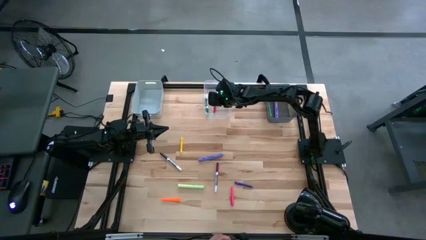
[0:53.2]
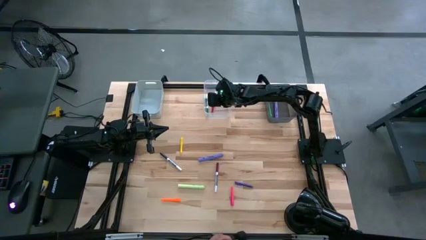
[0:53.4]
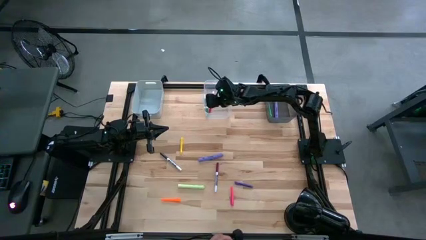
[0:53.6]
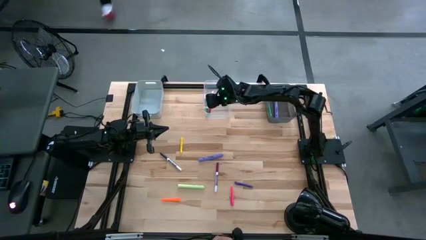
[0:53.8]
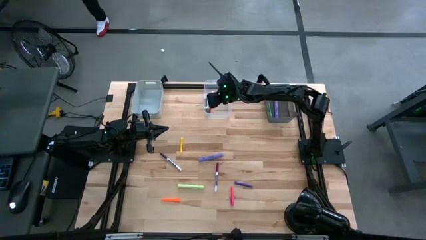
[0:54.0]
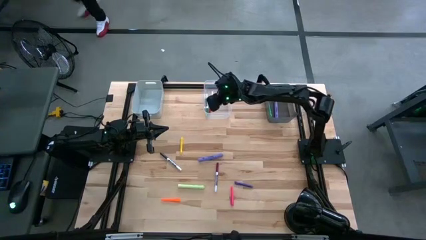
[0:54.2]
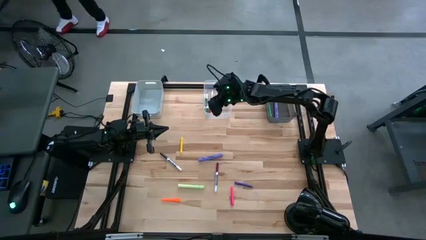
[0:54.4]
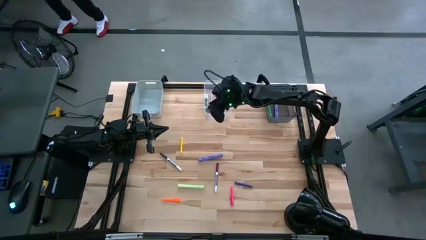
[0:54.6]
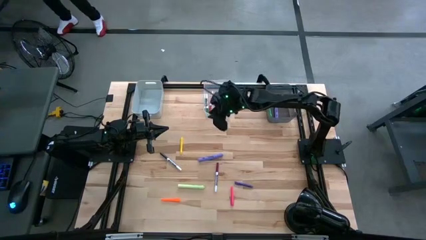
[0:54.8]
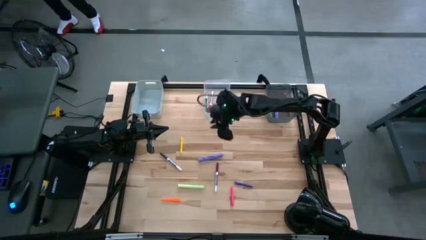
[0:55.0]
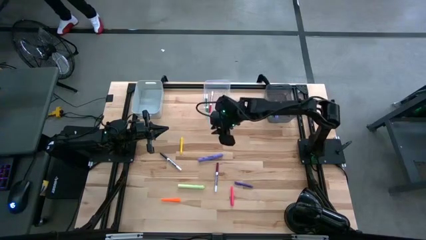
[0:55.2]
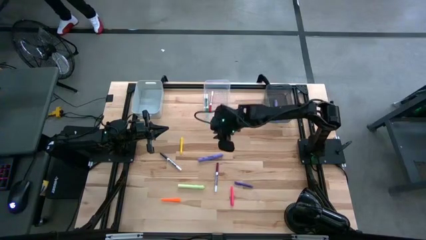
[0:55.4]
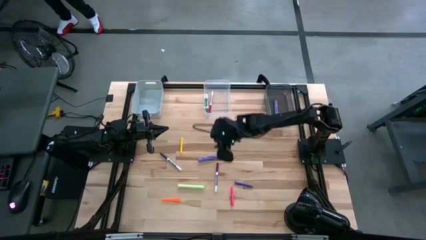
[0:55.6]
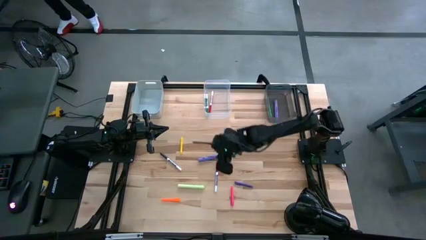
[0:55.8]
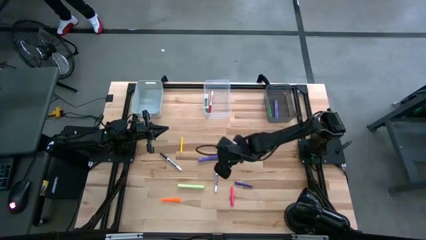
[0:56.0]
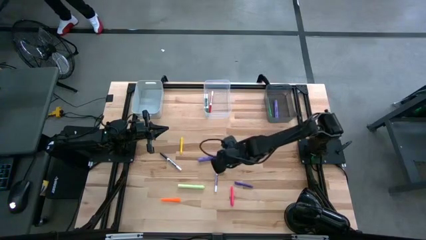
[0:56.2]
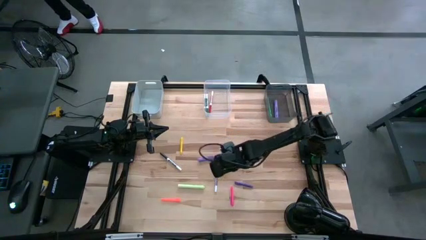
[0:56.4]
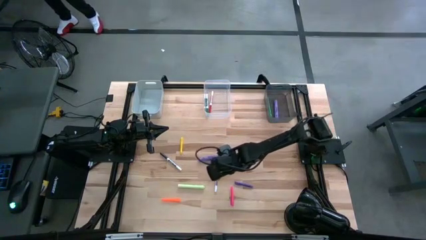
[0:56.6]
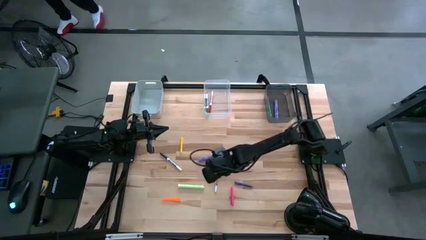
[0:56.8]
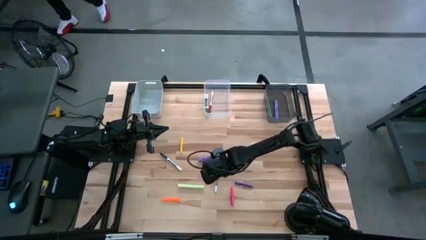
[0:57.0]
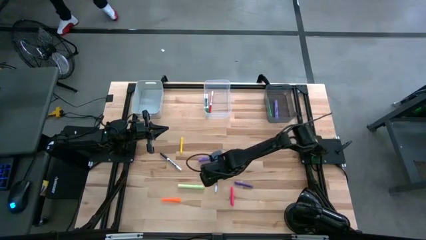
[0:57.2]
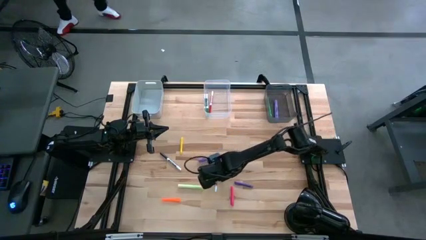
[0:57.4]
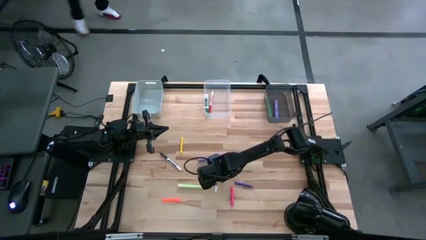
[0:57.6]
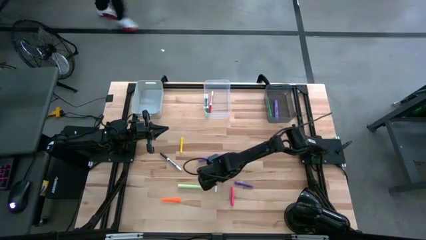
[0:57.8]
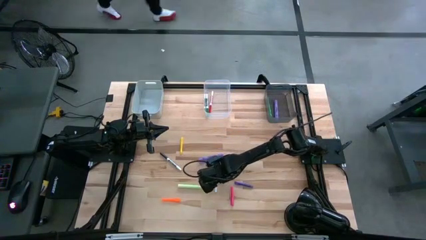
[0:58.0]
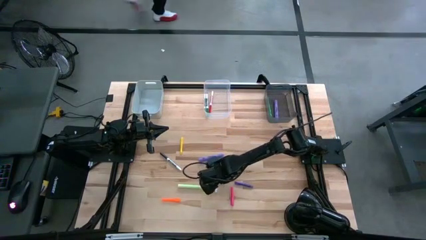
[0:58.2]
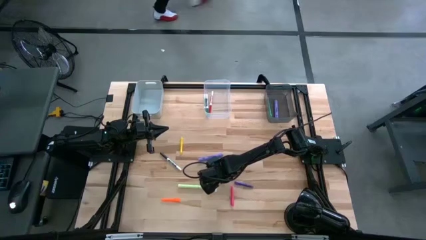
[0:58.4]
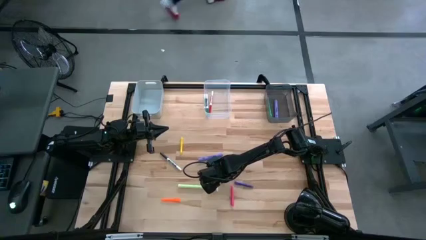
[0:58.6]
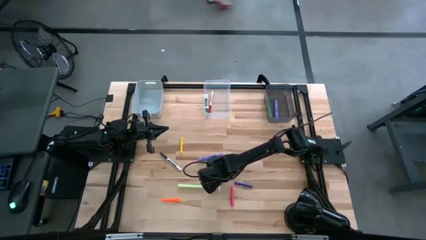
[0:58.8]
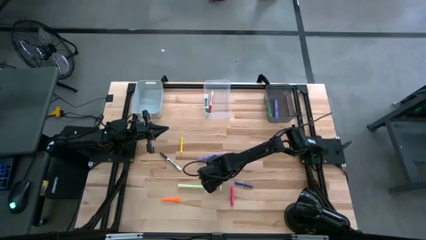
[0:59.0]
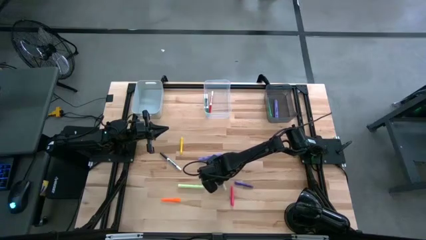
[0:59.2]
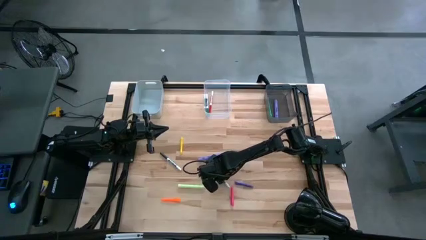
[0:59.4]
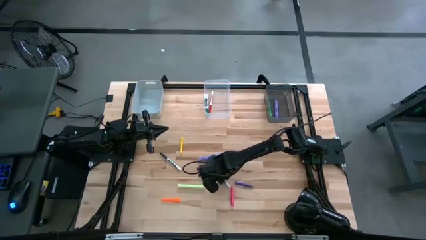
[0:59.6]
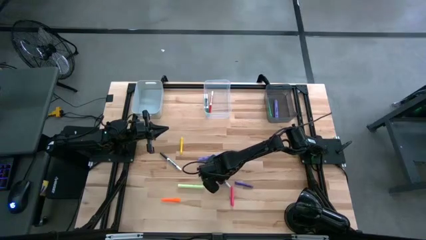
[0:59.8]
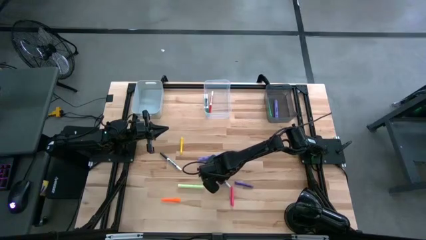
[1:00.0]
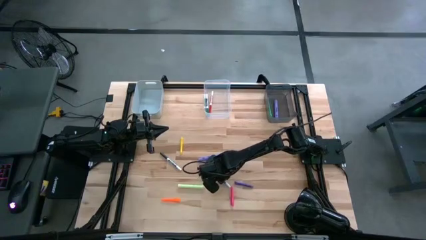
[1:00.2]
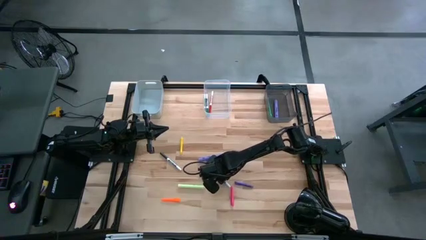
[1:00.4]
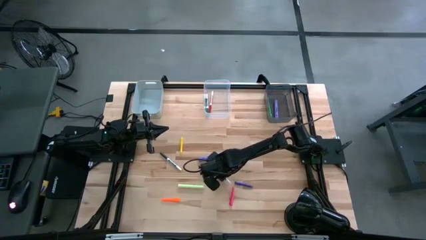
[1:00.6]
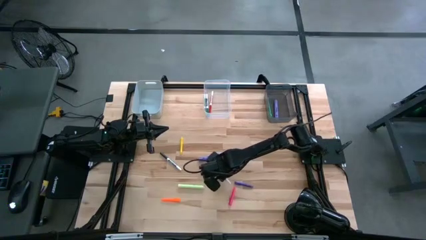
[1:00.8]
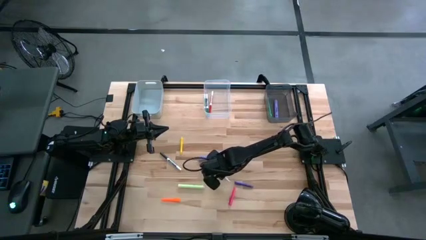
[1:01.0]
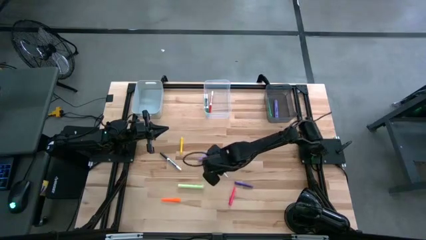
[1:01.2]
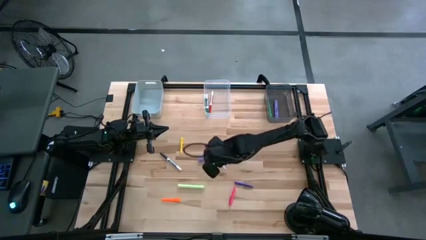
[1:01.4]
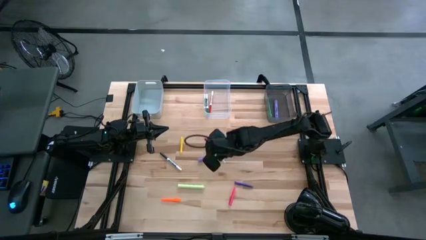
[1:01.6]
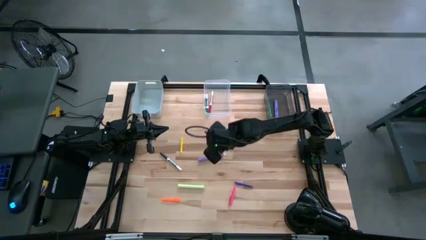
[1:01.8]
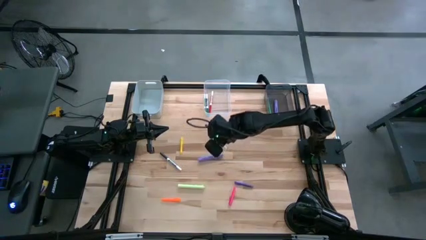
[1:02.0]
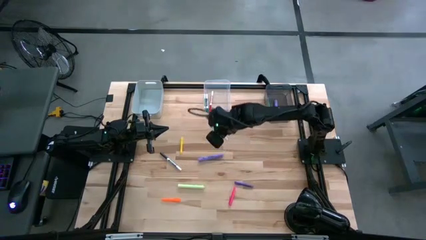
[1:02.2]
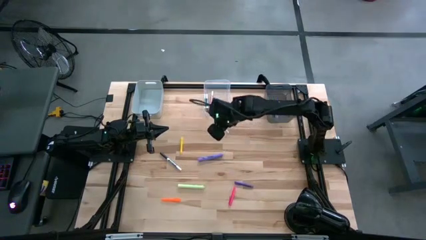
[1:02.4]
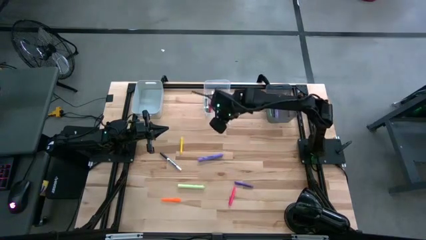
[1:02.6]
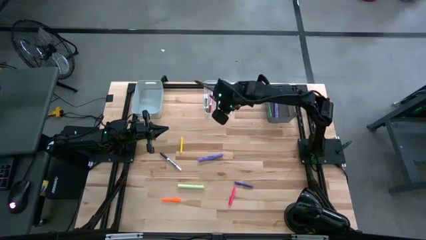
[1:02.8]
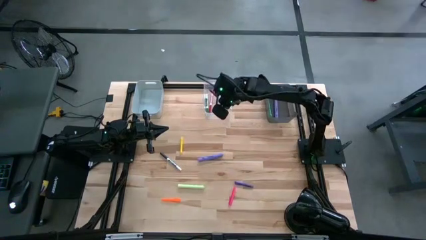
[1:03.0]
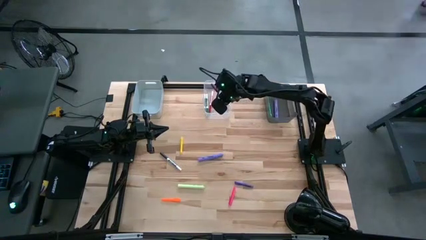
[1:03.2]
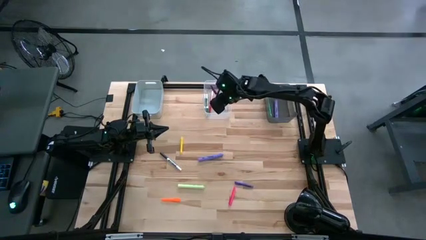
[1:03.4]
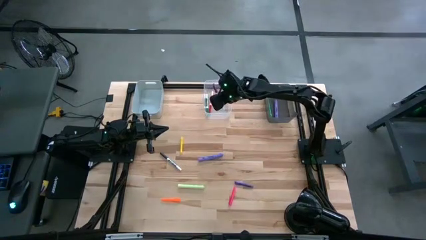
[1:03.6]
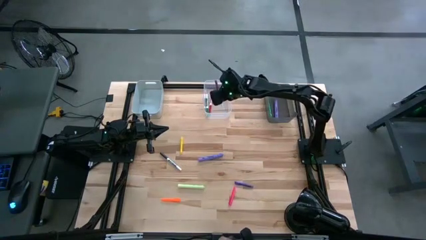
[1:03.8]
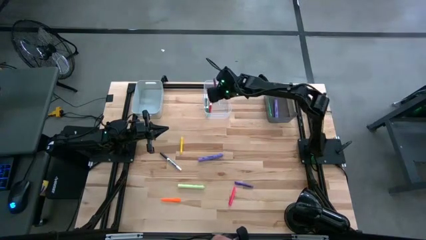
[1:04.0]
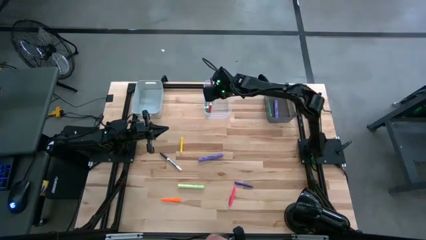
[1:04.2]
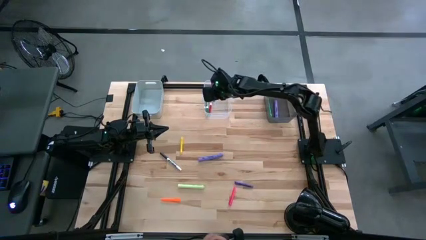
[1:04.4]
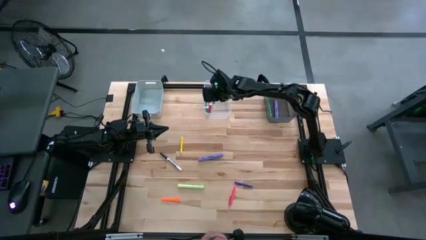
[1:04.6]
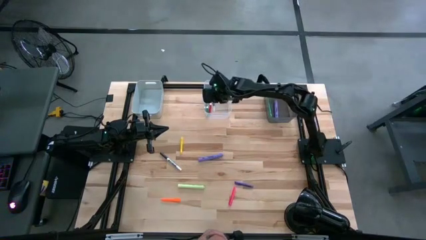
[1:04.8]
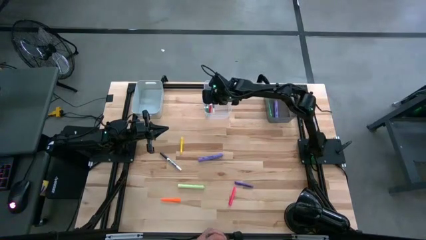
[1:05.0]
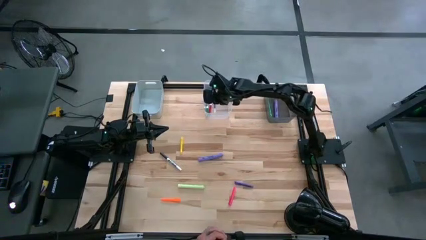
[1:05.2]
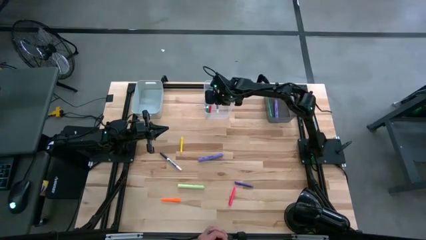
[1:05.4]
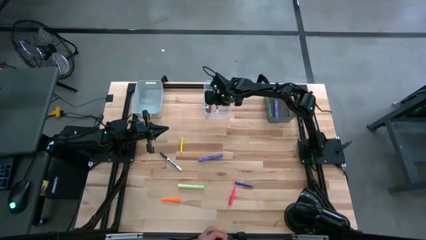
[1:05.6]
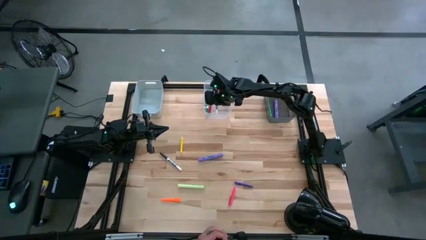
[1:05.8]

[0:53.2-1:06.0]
Task: Pick & Place Markers
Put the maroon marker pen into the transparent bin
